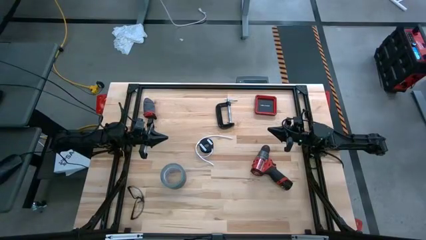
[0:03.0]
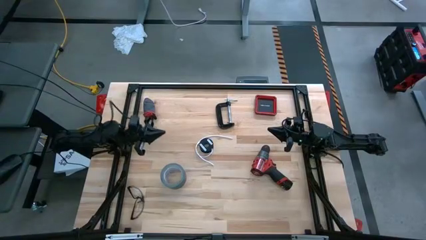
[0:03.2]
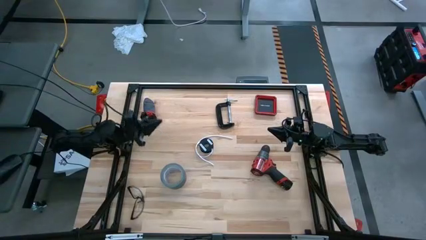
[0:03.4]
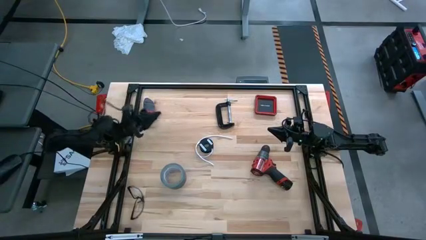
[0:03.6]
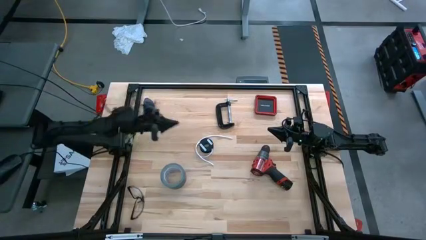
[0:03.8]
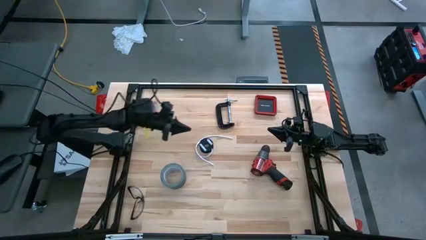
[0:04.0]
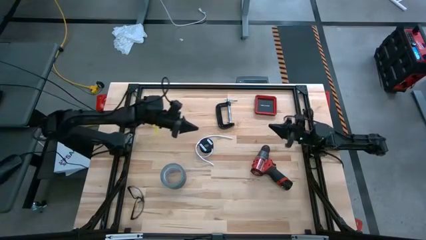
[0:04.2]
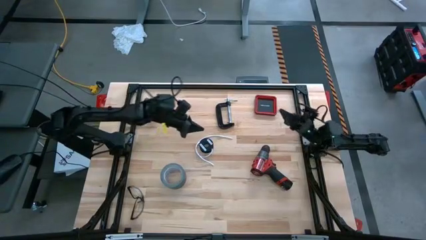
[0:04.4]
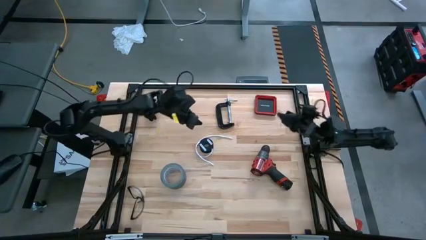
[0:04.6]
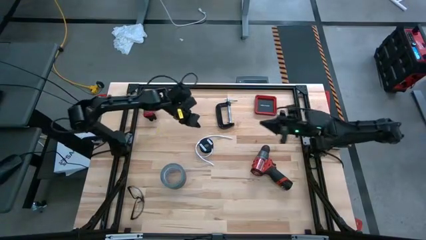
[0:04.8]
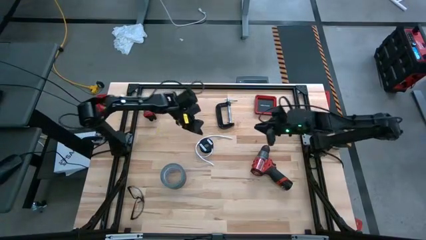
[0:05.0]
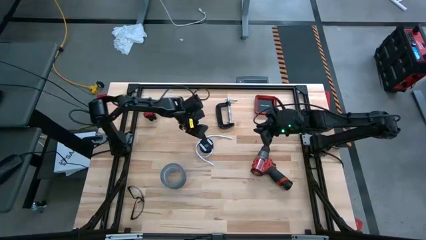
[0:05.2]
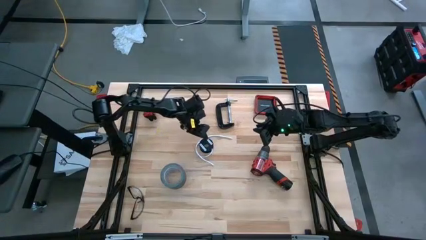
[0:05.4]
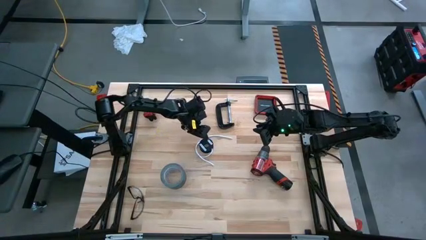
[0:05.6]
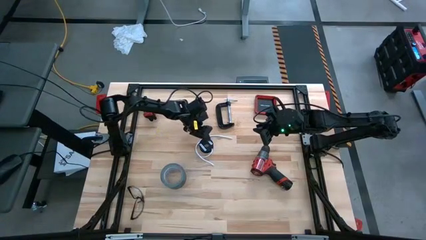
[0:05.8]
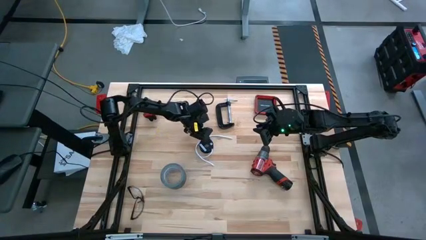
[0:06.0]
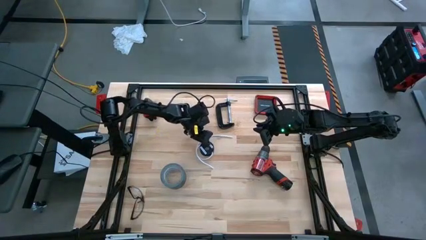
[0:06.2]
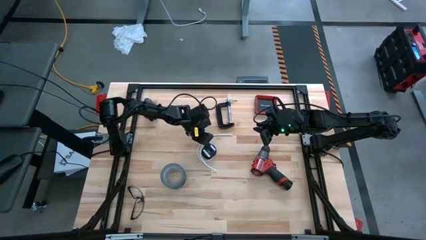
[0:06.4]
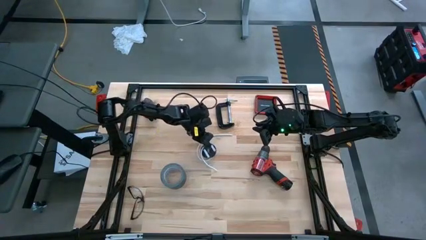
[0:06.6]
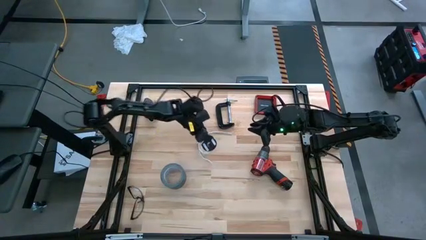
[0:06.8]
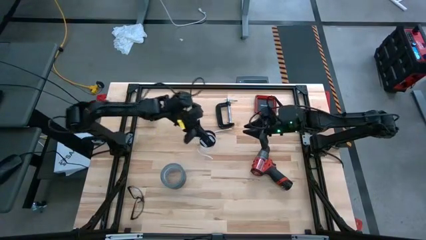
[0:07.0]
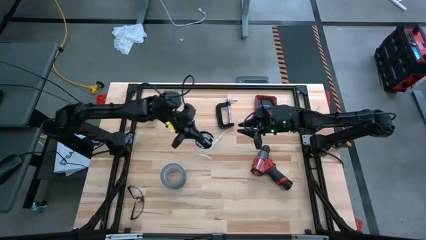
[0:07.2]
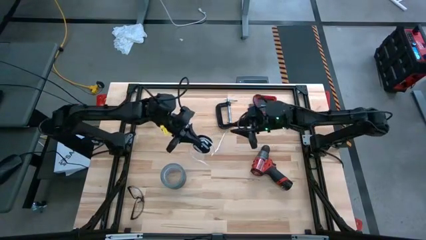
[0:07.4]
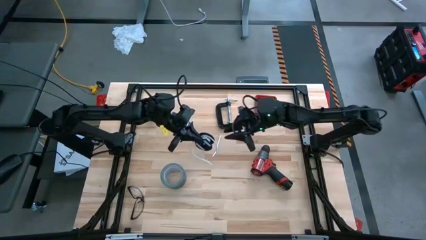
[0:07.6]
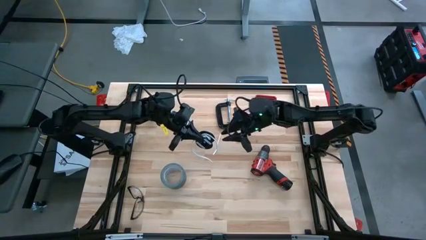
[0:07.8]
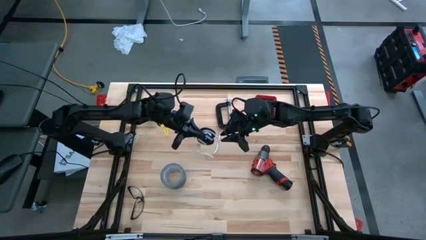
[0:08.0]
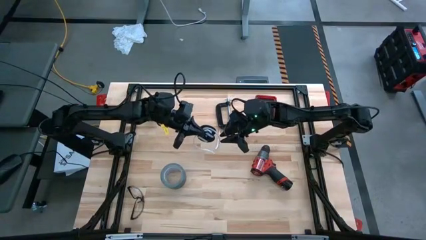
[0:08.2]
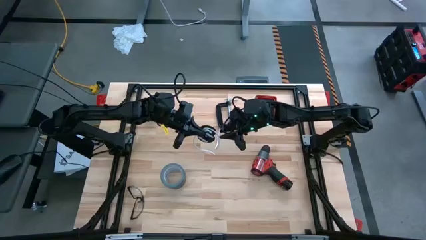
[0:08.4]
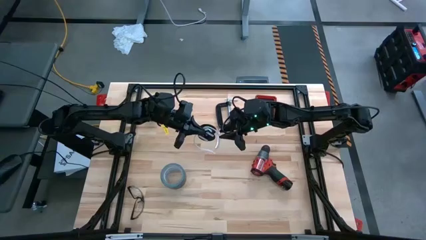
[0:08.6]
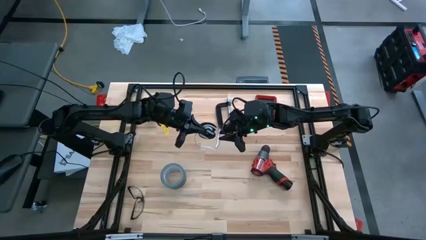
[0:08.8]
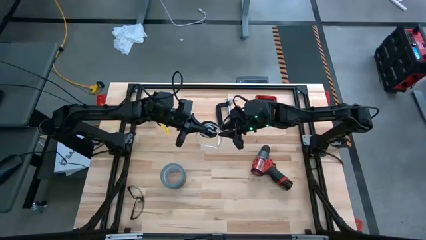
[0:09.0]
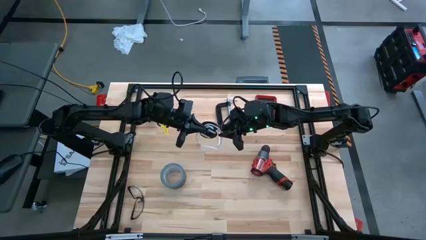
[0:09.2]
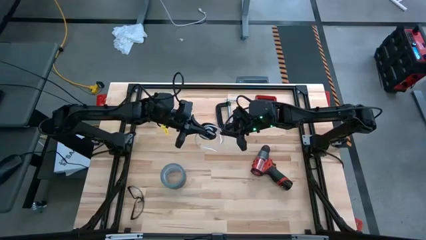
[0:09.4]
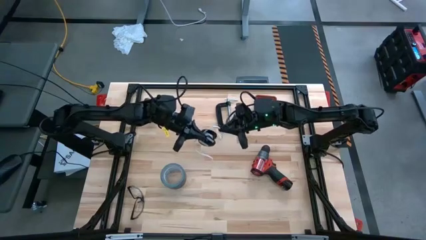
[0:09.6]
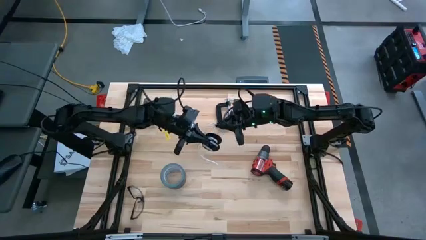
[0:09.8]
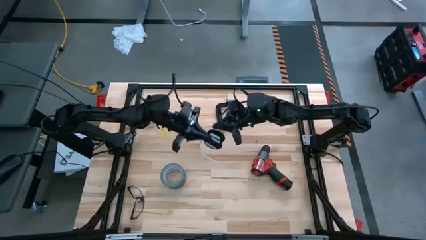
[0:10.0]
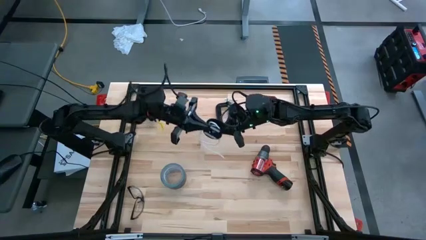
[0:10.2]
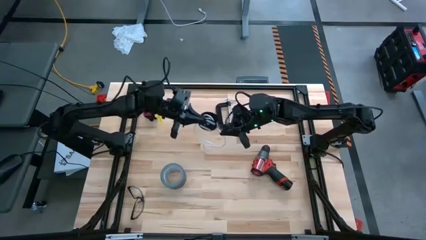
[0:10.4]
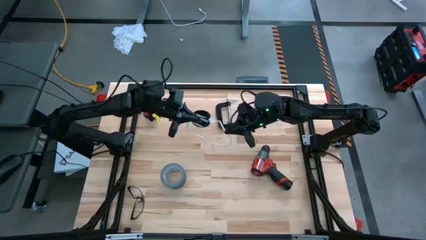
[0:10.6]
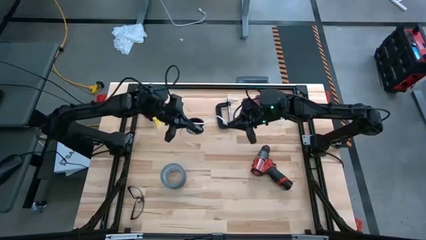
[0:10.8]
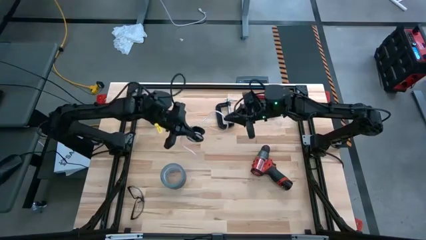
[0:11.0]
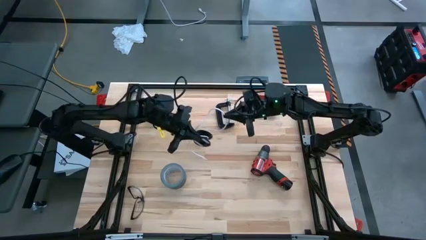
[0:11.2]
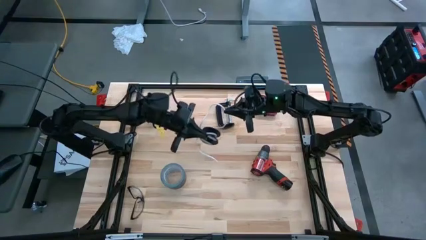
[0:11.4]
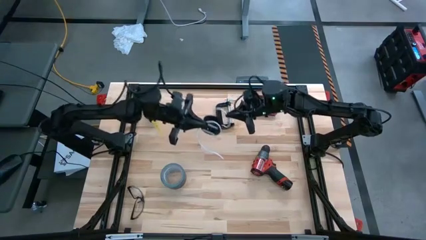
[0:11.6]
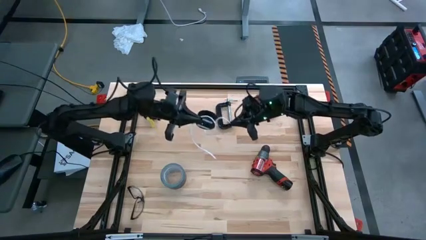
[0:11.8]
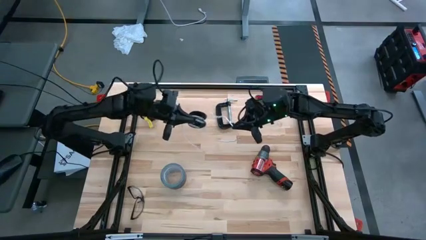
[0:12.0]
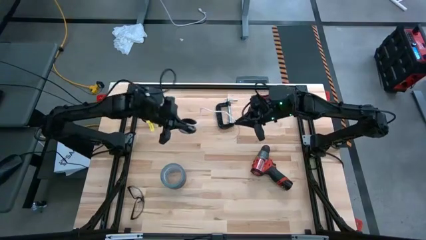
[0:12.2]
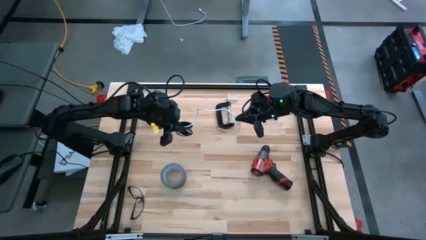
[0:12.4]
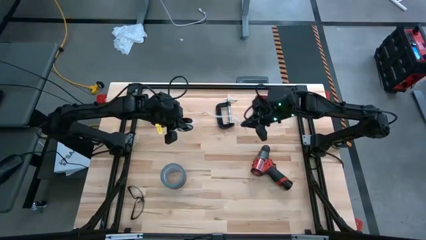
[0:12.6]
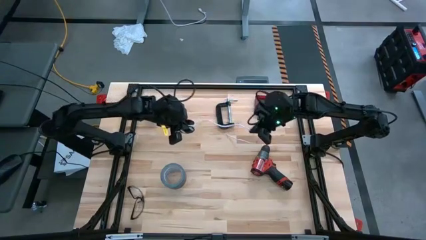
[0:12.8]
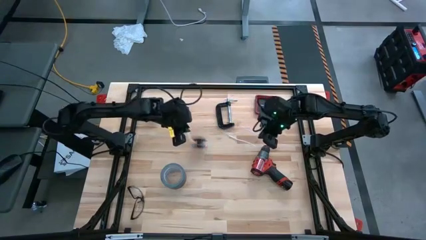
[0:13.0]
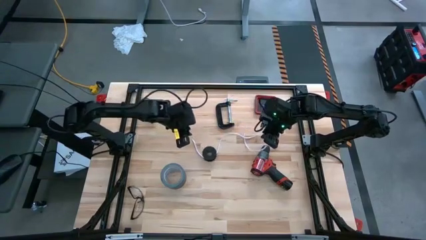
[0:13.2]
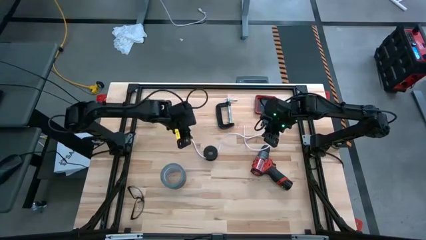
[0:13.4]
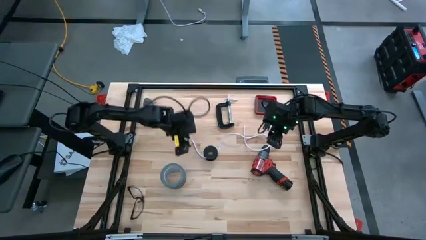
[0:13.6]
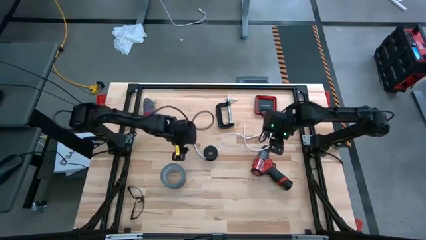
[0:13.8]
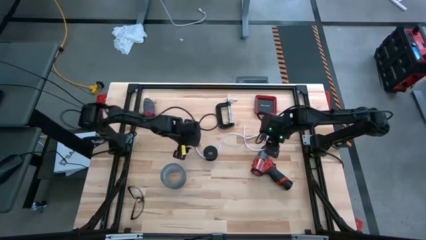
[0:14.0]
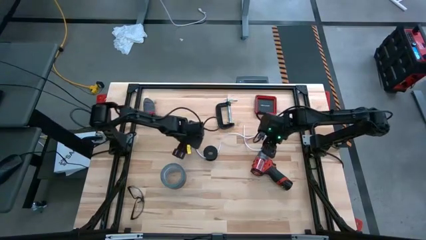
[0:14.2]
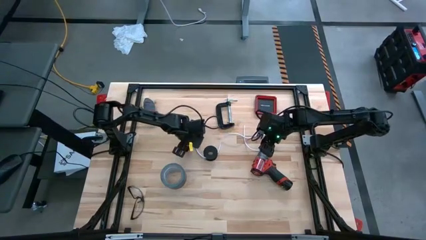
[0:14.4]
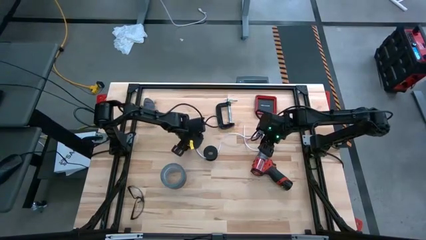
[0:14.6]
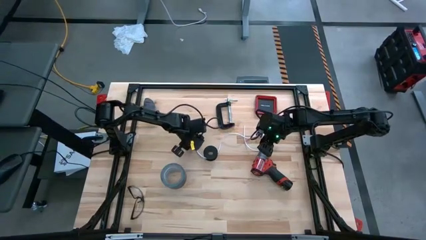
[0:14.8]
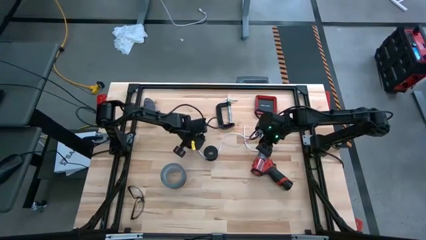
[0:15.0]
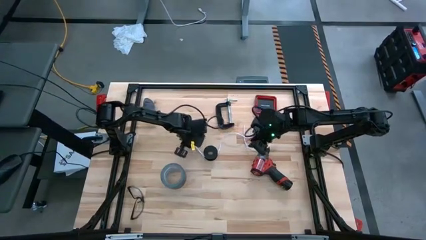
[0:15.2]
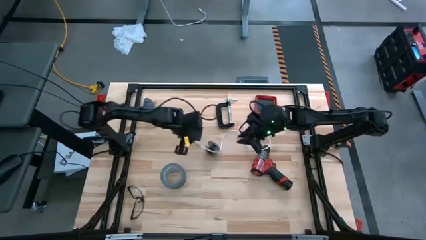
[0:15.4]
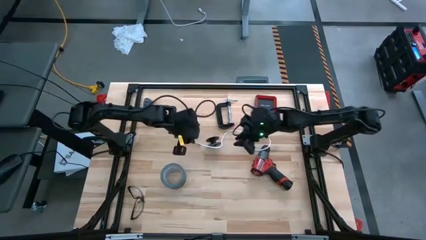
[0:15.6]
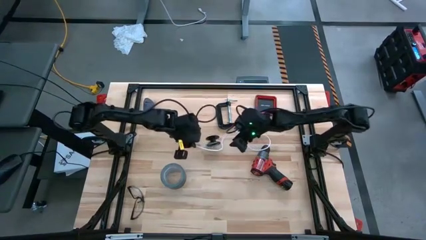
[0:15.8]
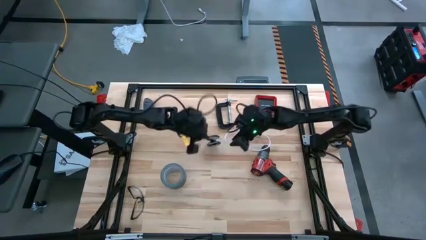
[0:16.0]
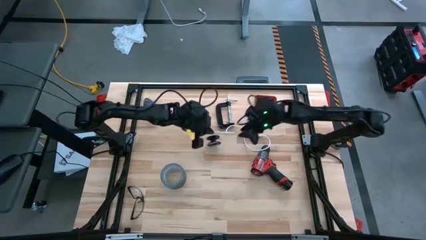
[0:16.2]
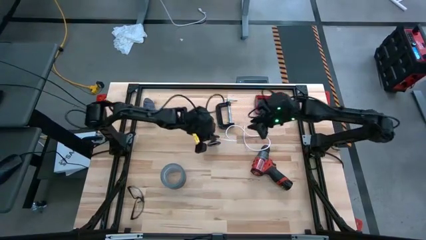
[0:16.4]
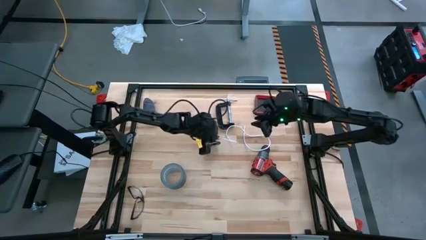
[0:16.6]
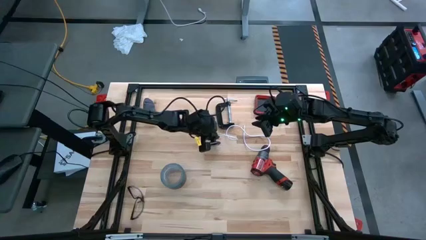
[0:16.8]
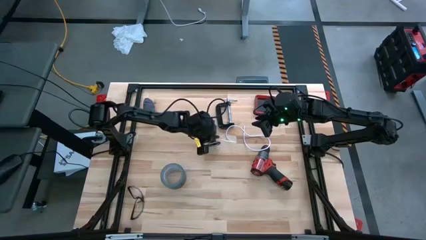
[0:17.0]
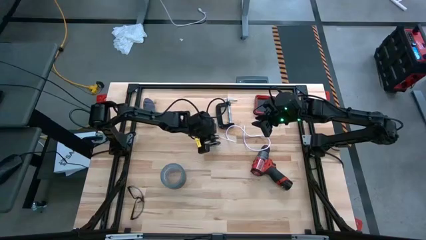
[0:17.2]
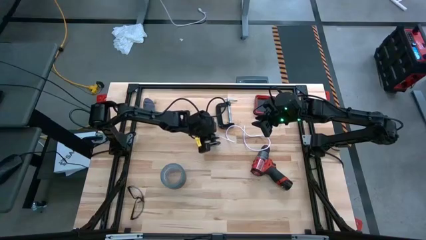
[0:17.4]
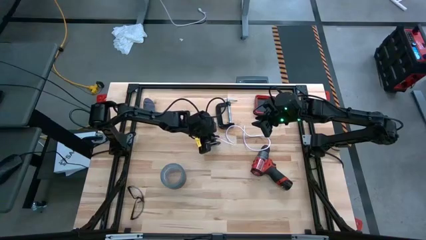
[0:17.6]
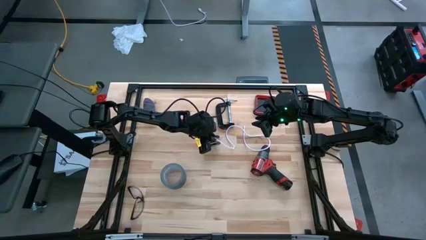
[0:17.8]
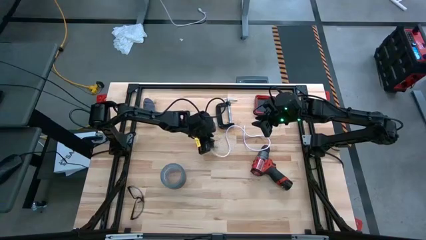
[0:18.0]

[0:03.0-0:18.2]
Task: Coil cords
Uncoil the white wire from the black spool
